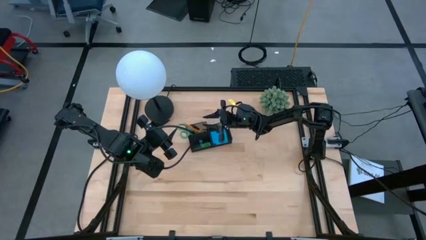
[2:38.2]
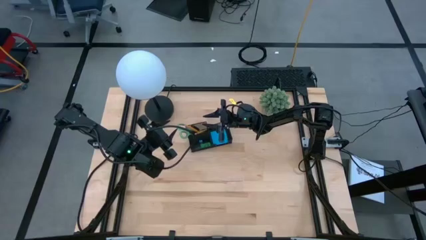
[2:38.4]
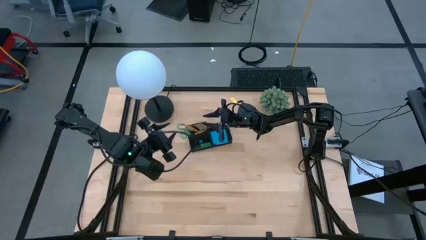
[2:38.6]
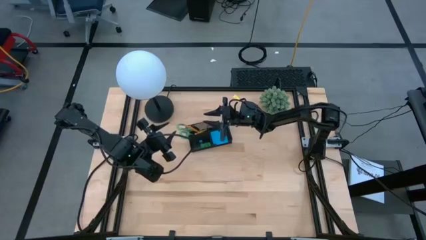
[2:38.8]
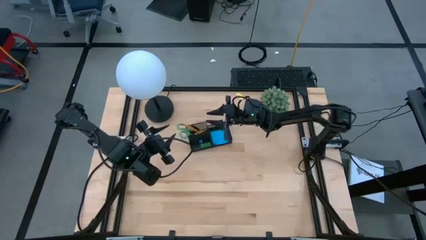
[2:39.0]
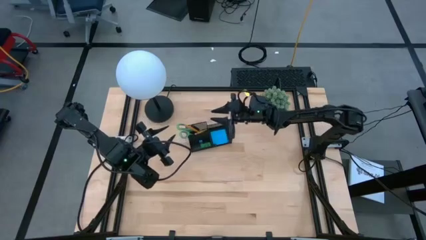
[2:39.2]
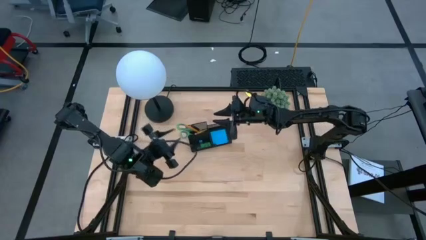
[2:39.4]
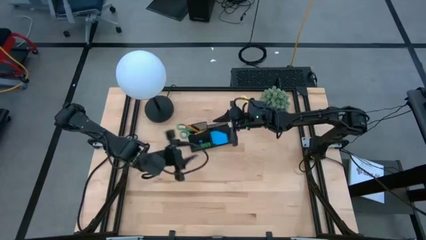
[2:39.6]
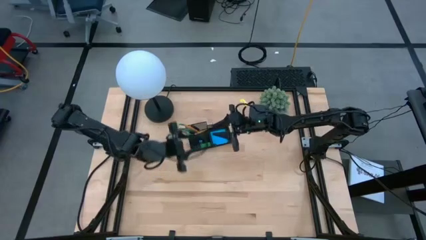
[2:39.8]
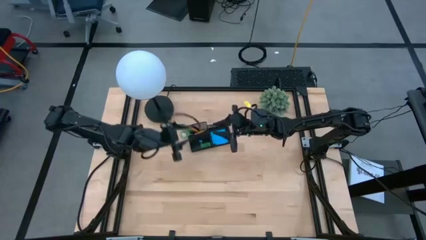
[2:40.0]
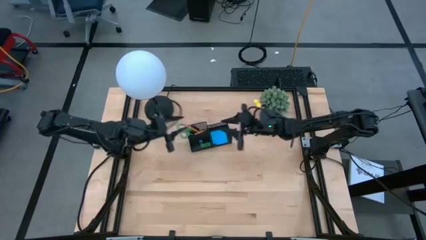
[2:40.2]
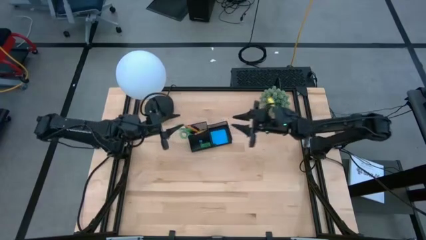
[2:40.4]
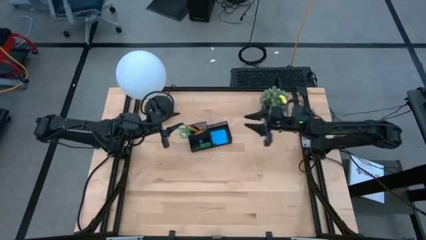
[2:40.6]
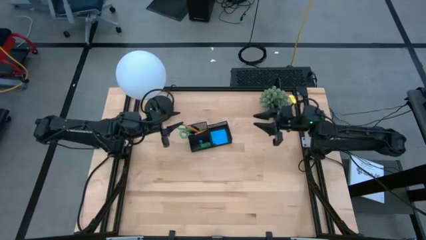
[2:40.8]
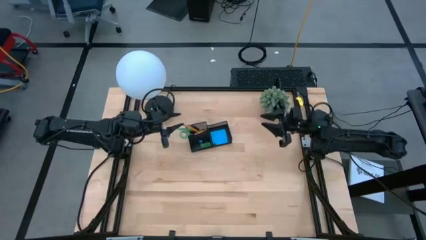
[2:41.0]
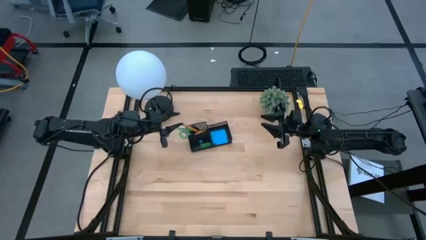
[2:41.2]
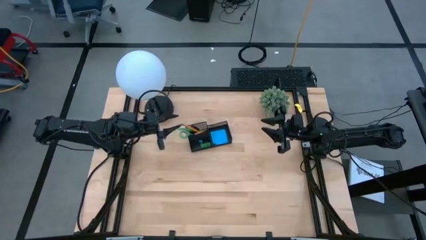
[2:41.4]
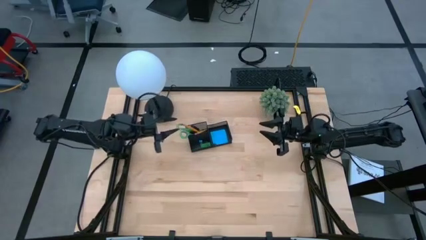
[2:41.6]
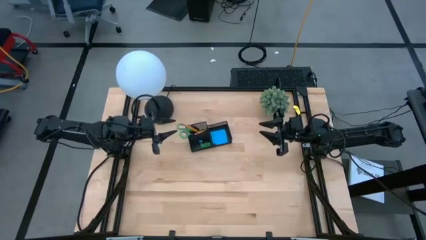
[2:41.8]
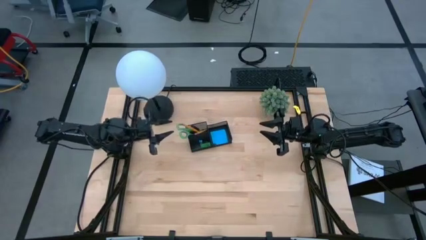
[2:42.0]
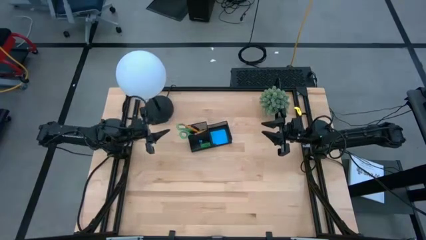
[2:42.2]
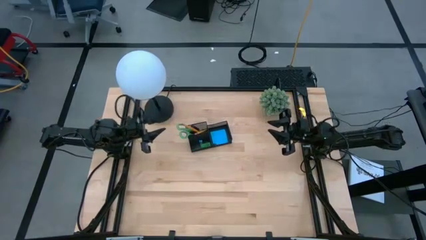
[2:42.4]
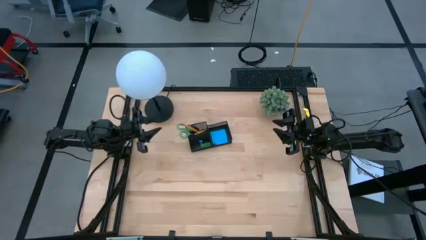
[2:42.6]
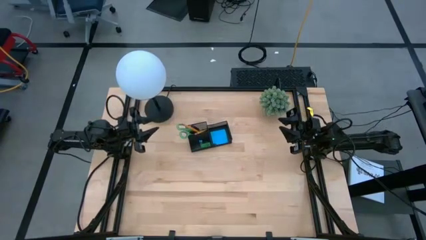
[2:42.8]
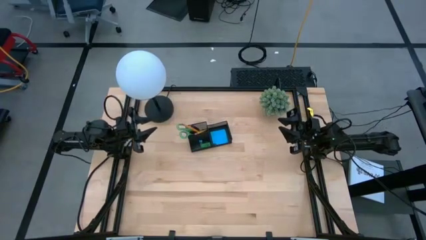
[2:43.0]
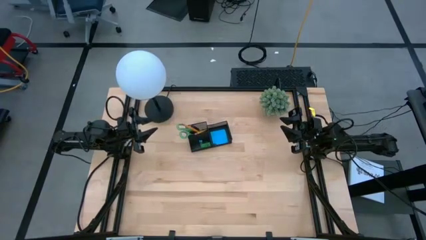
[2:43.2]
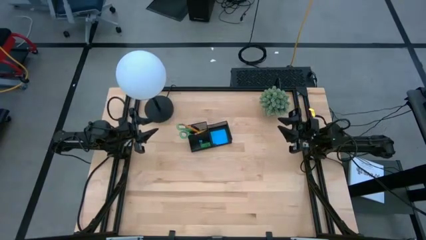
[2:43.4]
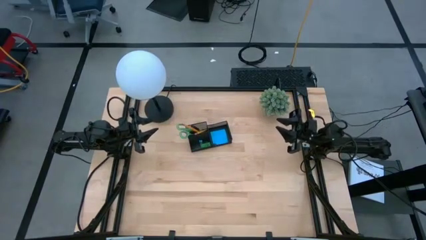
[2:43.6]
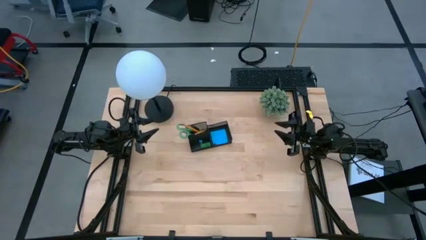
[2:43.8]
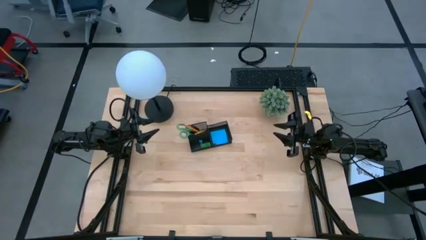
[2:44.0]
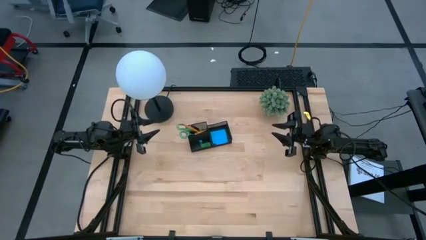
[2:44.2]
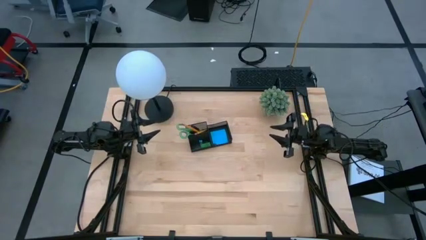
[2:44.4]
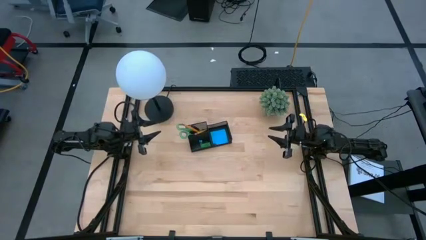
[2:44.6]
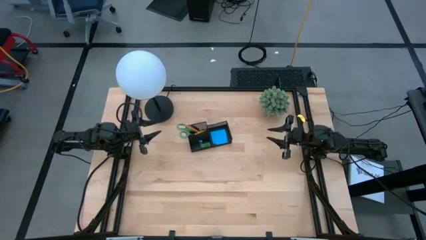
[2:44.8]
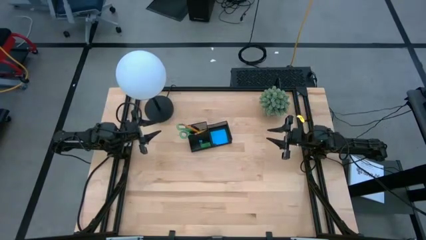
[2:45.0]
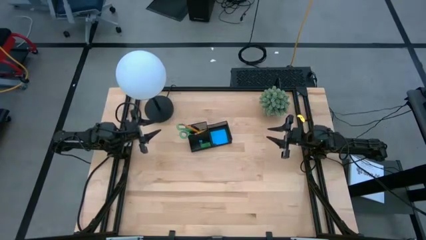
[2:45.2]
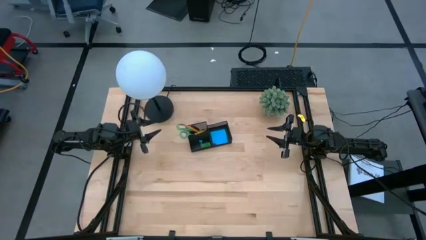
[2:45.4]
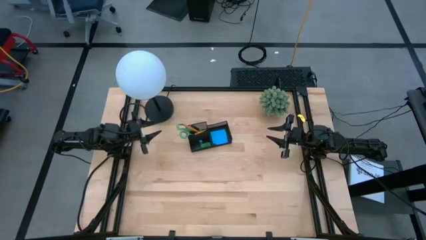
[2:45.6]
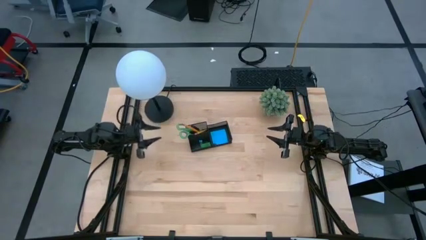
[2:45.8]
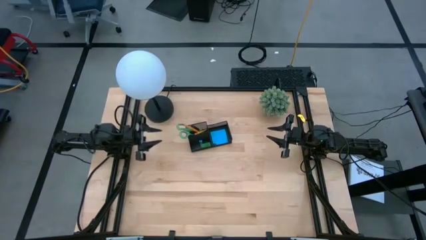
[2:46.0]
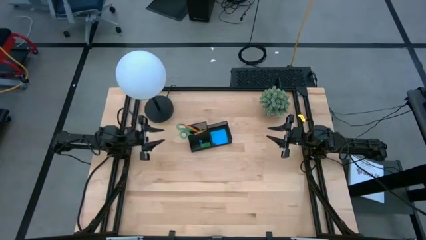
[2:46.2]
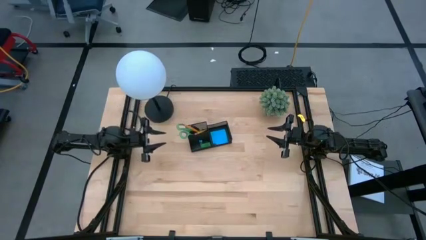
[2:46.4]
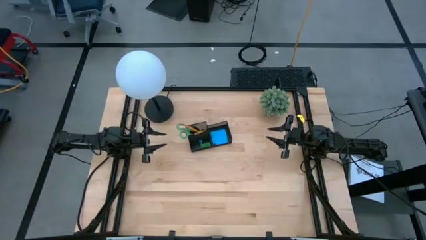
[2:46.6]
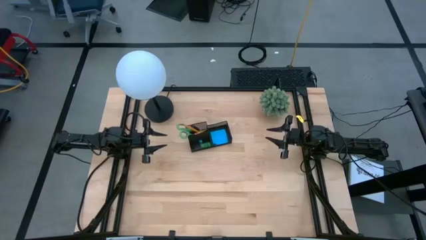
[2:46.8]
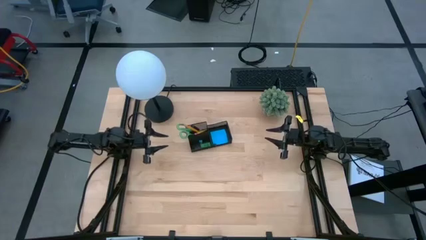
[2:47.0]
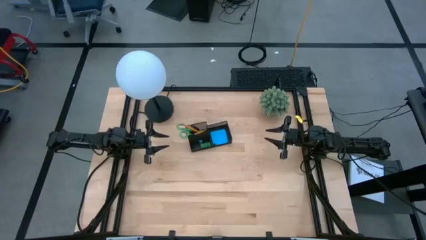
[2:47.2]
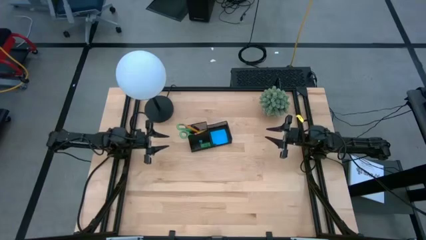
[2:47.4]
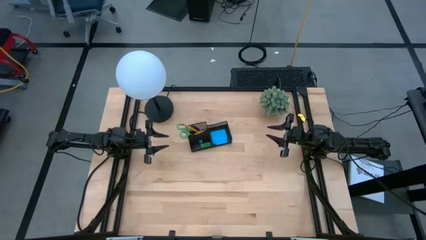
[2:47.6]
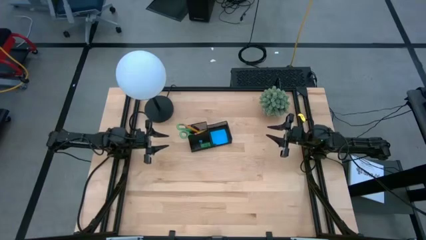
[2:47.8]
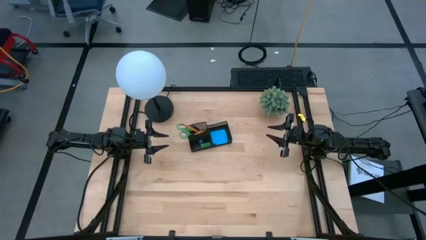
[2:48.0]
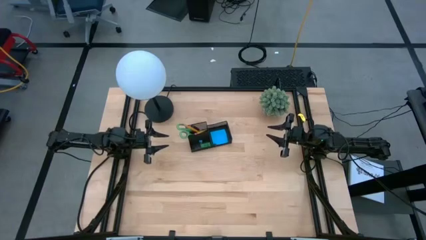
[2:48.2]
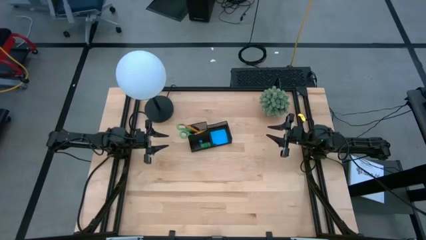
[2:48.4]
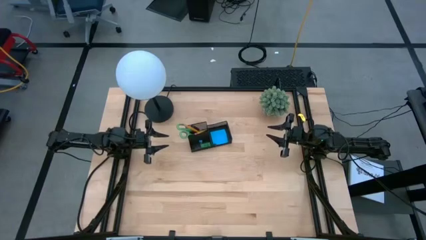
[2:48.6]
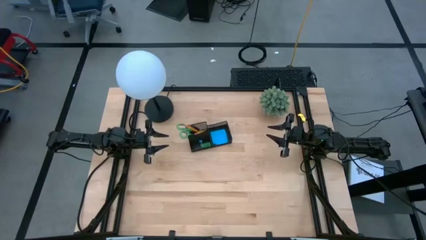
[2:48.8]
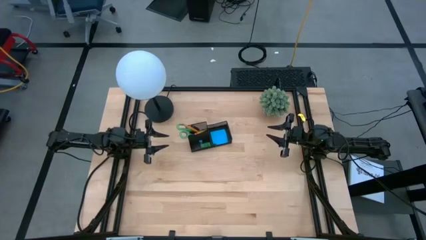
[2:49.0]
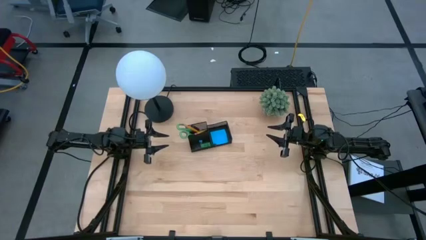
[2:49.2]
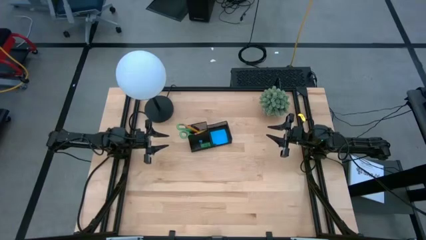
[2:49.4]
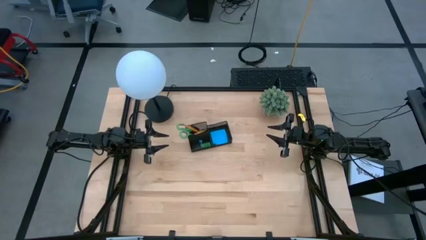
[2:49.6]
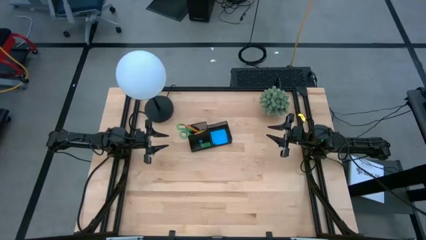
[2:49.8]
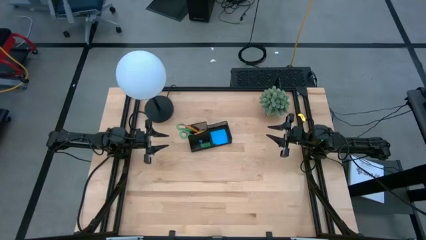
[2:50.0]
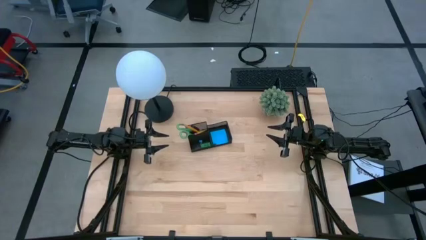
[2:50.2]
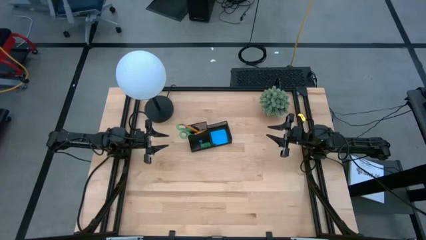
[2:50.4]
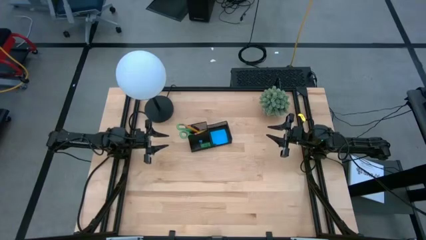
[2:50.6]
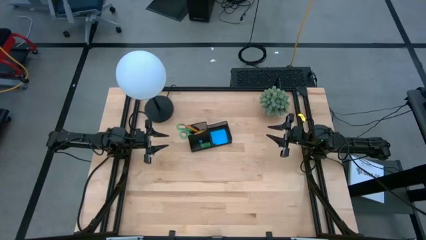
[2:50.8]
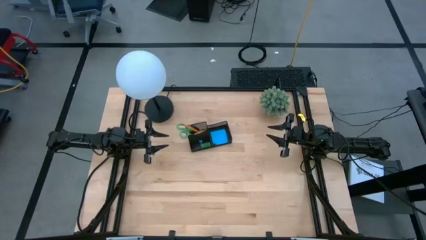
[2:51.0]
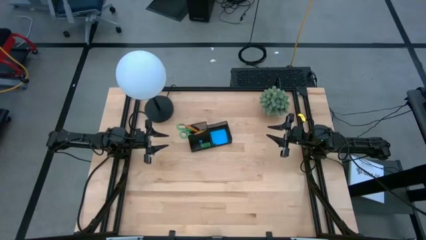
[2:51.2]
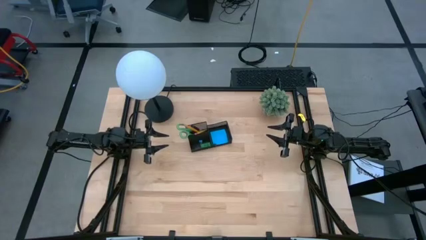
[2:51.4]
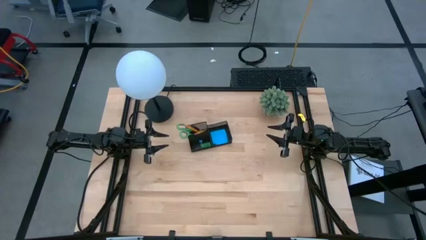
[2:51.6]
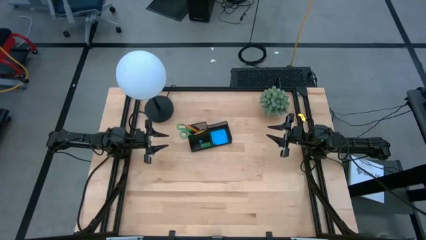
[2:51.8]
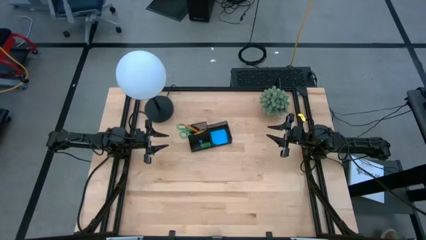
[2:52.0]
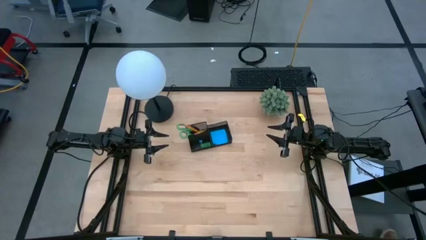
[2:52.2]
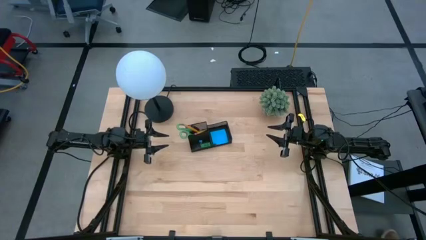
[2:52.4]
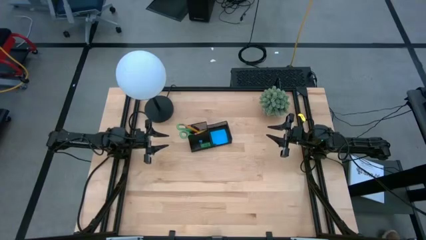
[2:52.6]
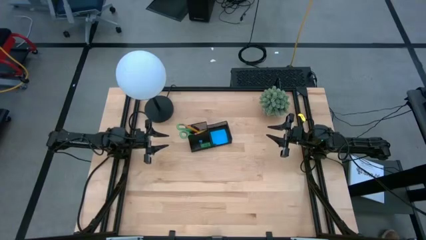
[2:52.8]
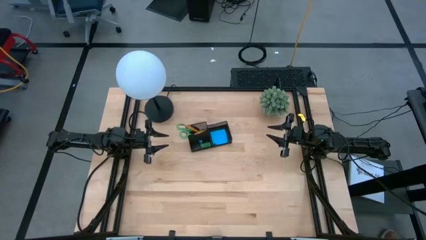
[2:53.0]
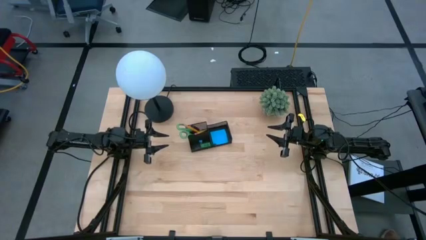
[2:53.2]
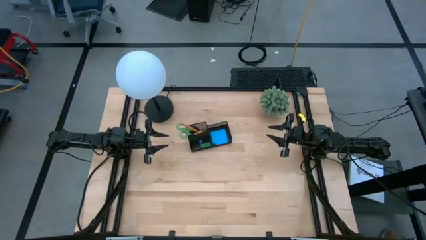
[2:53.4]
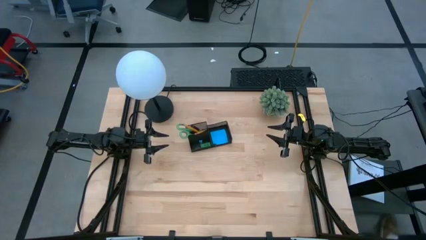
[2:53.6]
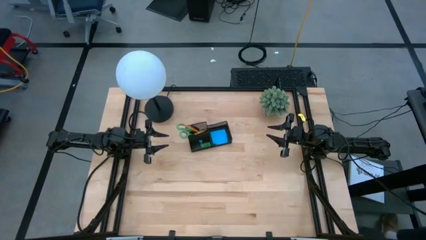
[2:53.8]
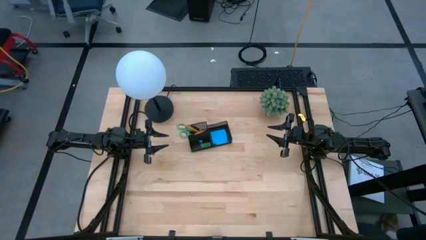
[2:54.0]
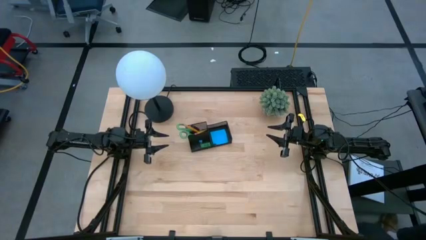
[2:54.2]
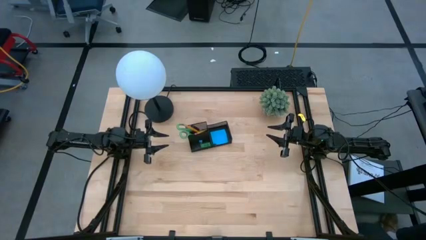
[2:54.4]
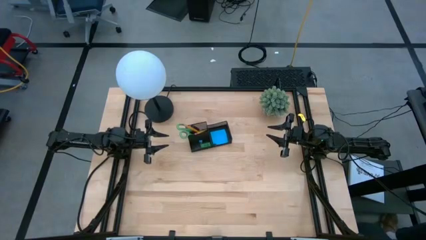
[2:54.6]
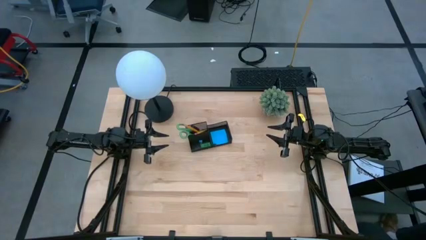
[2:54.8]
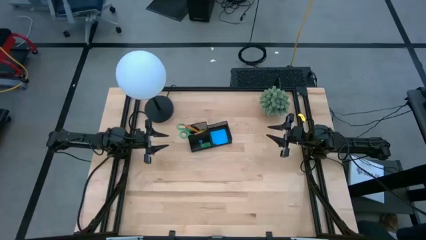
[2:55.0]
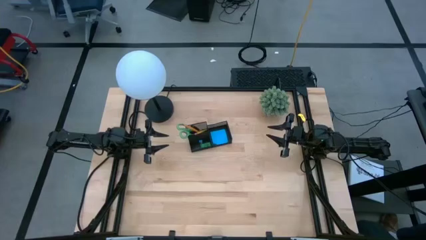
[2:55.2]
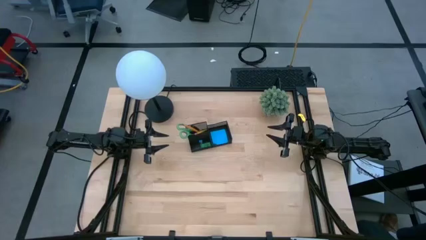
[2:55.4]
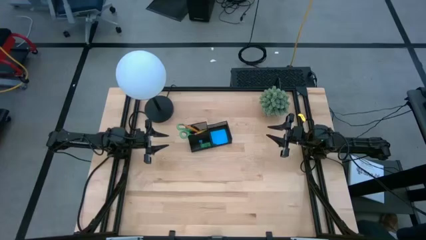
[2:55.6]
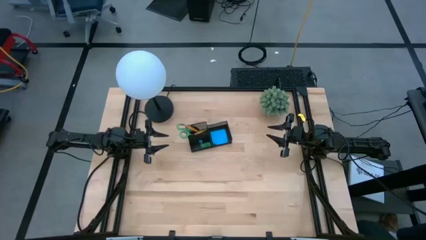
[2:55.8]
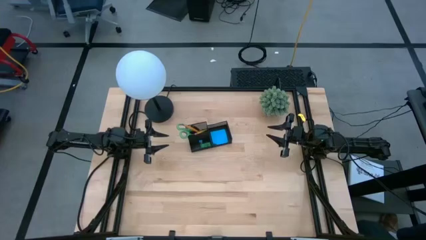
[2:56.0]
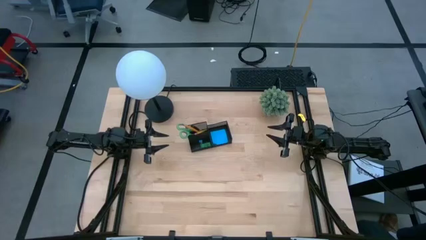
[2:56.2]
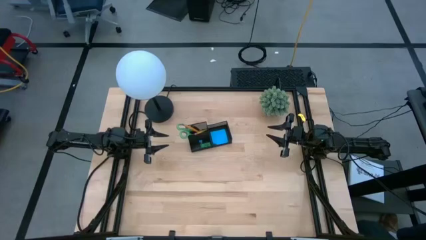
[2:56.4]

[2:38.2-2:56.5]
Task: Pick and place office supplies into organizer
Return to Home Position
